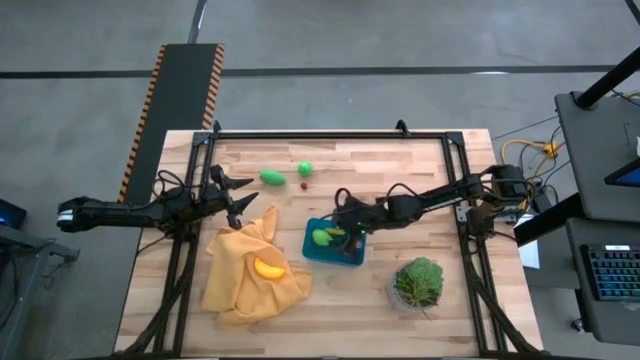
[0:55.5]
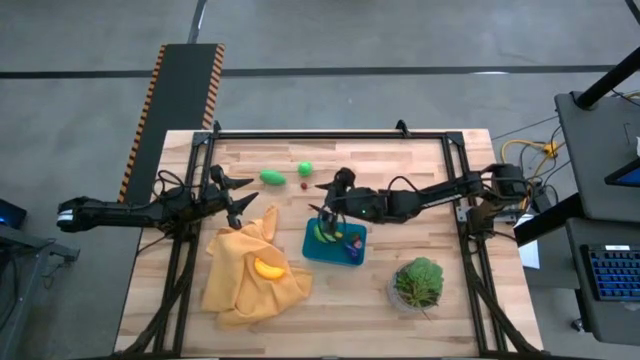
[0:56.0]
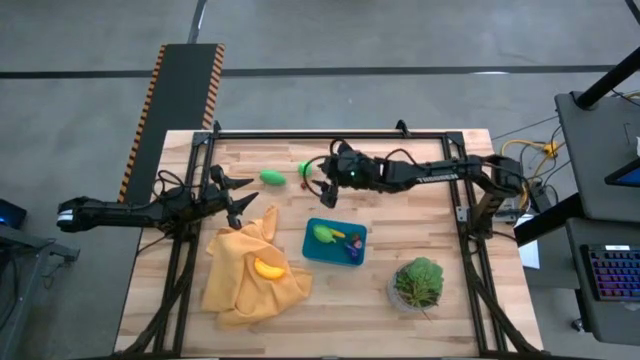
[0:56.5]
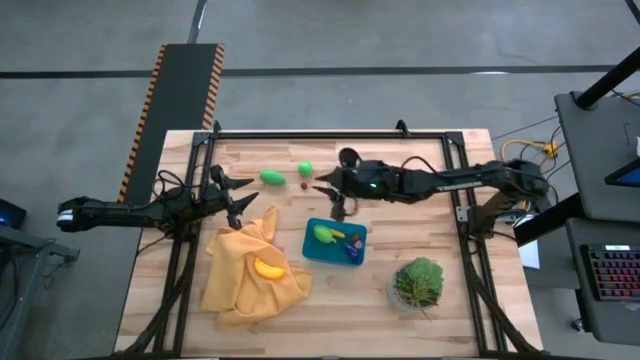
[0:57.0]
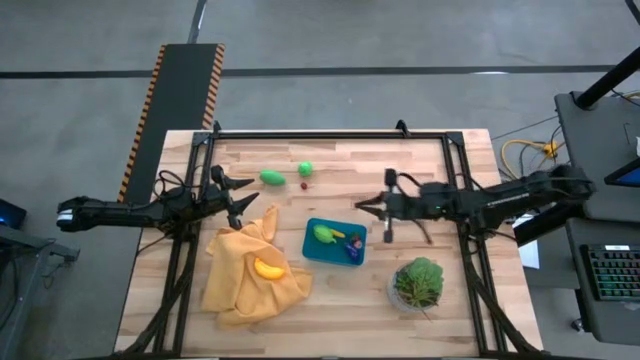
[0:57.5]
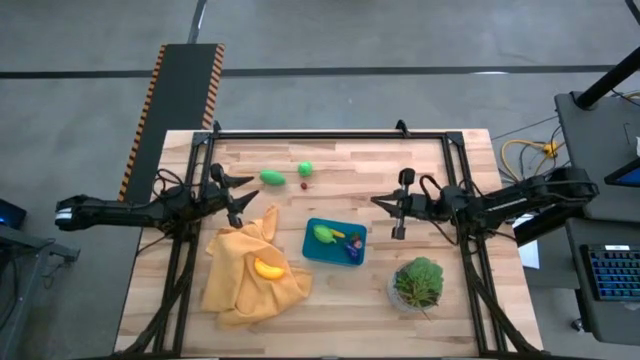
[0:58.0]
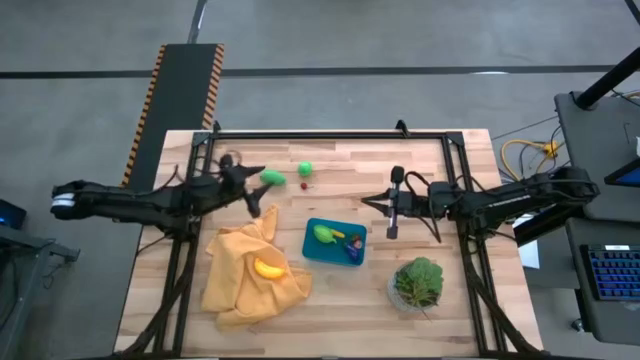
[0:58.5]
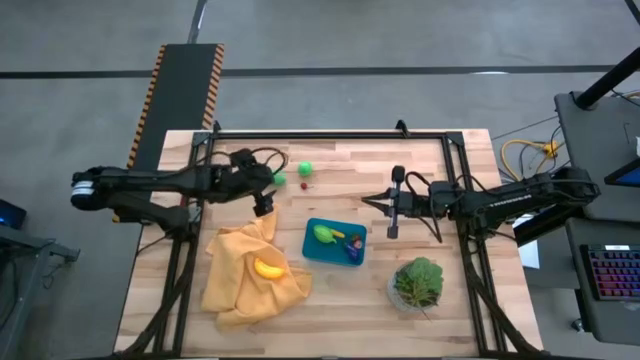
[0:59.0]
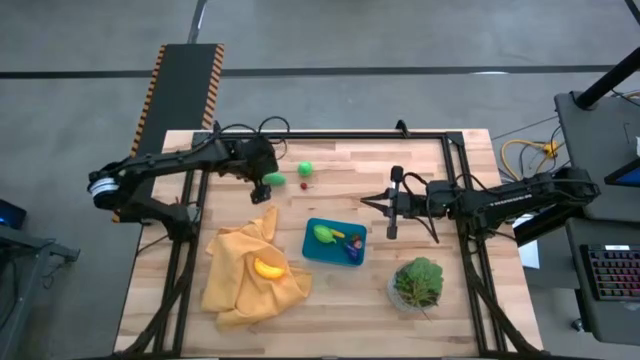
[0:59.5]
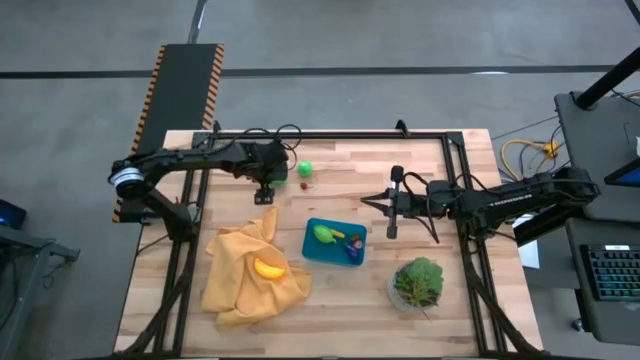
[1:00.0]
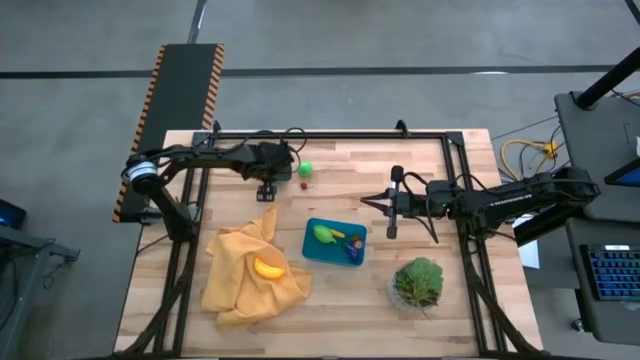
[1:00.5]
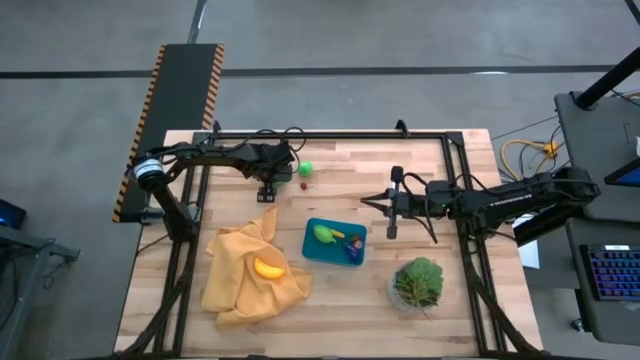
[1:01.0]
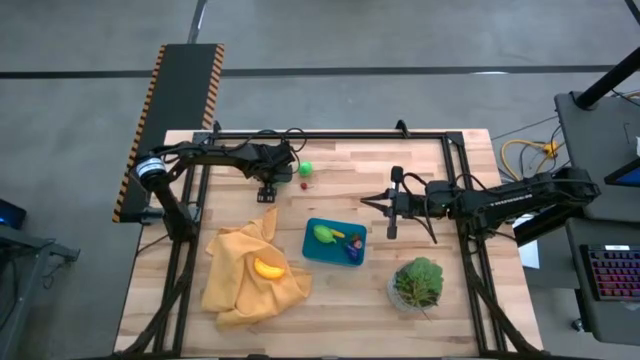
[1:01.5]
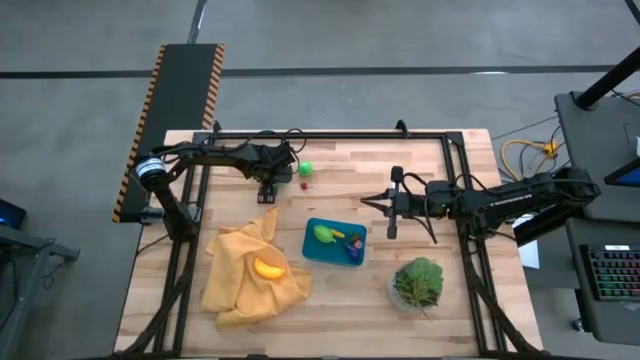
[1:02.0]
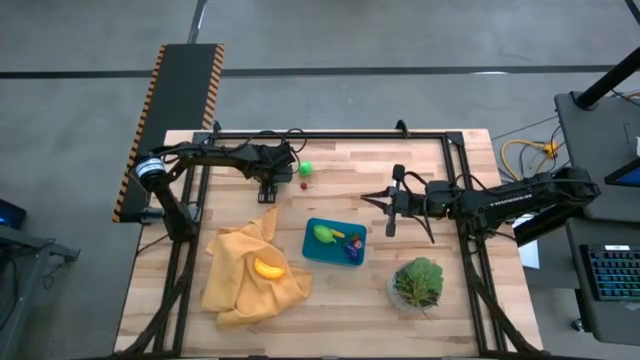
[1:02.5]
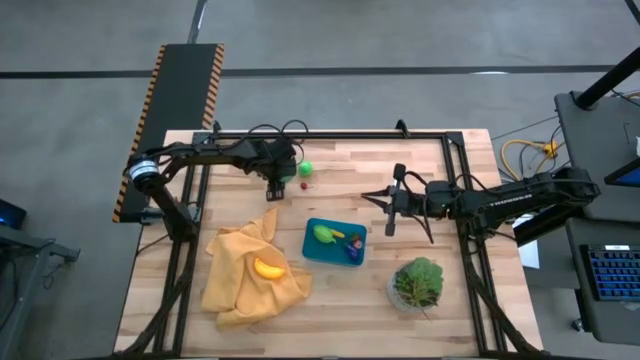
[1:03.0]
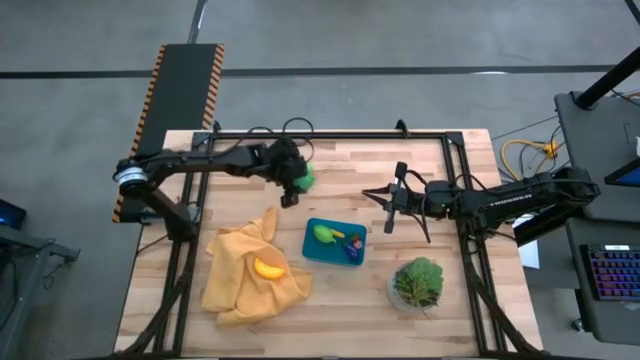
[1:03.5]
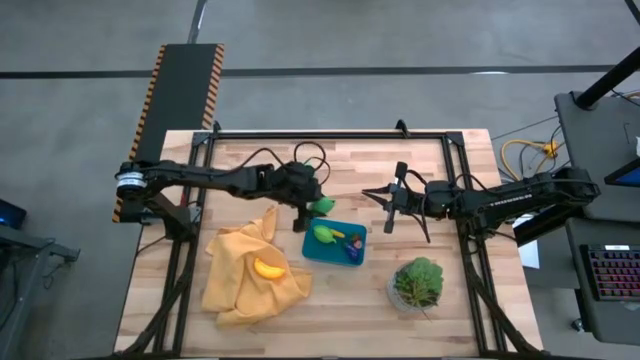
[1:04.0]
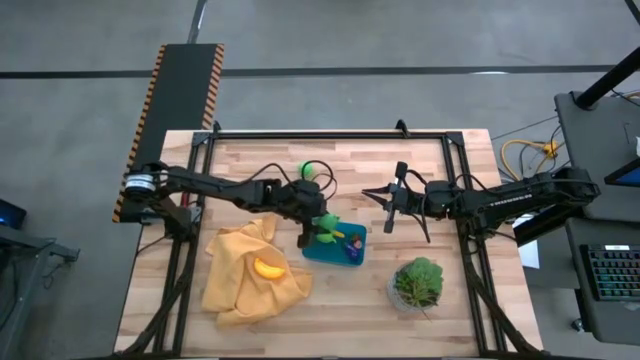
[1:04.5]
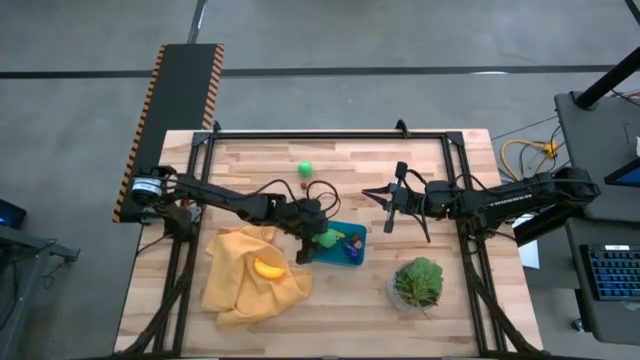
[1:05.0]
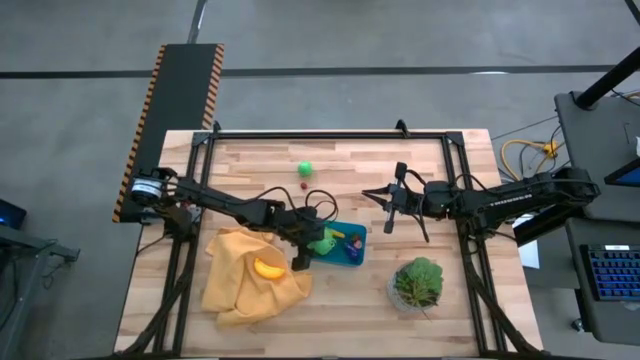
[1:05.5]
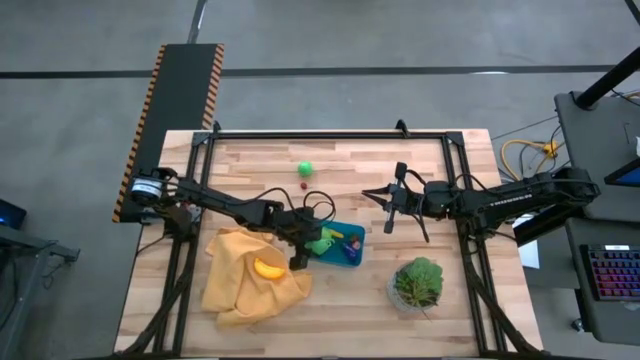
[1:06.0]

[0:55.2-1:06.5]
Task: Pick and placing Produce into tupperware
Put the green corn into the blue bin

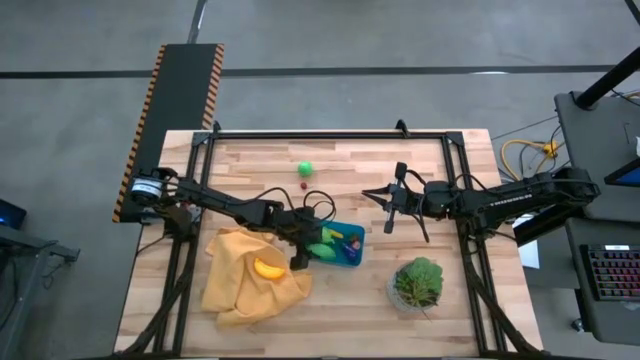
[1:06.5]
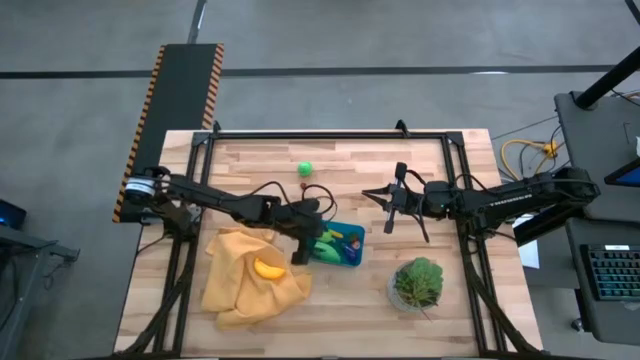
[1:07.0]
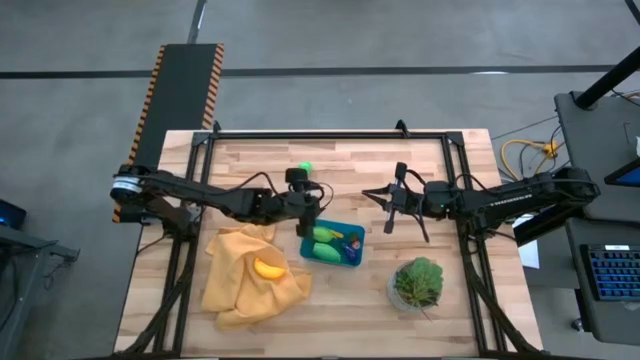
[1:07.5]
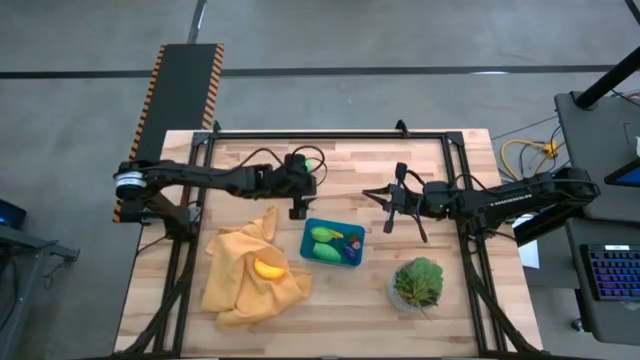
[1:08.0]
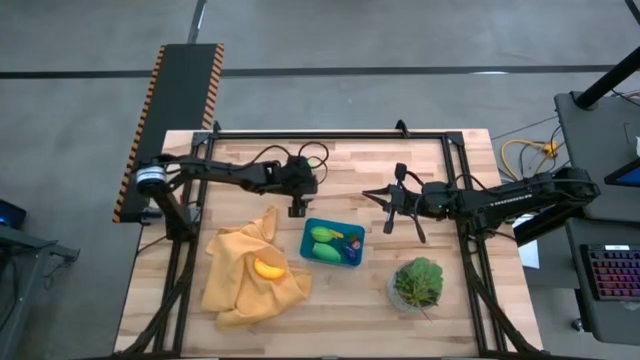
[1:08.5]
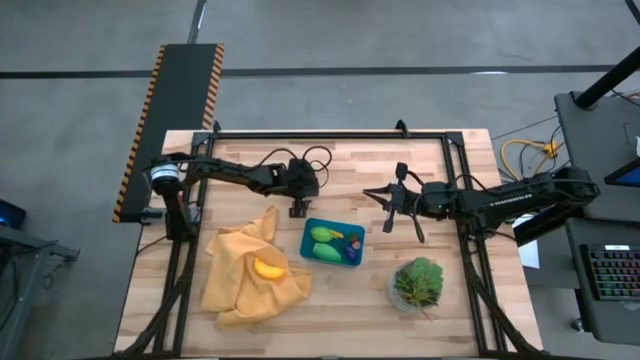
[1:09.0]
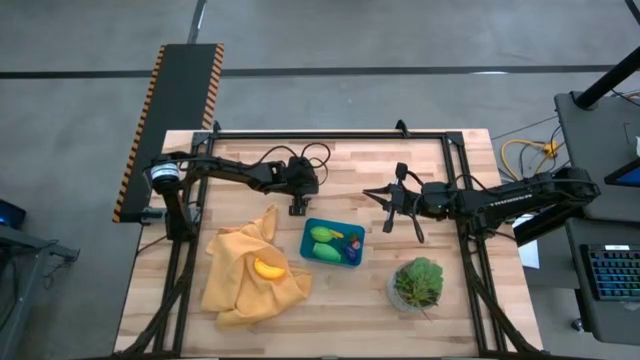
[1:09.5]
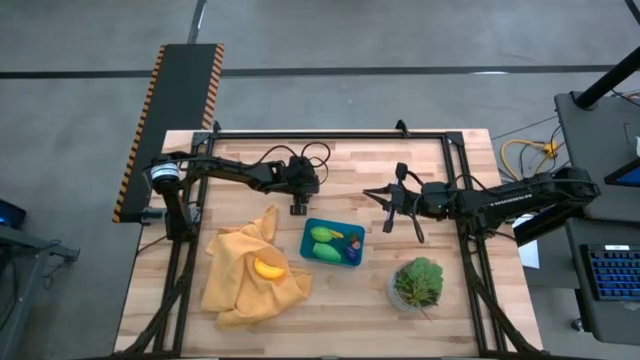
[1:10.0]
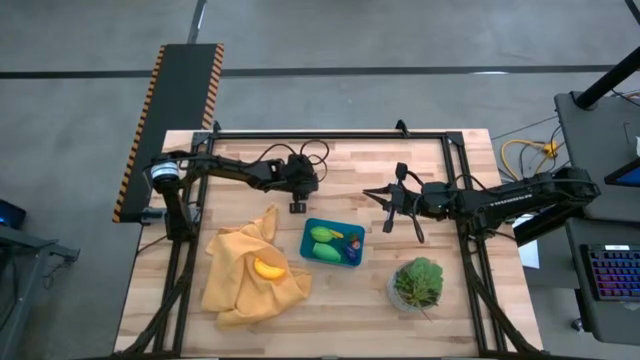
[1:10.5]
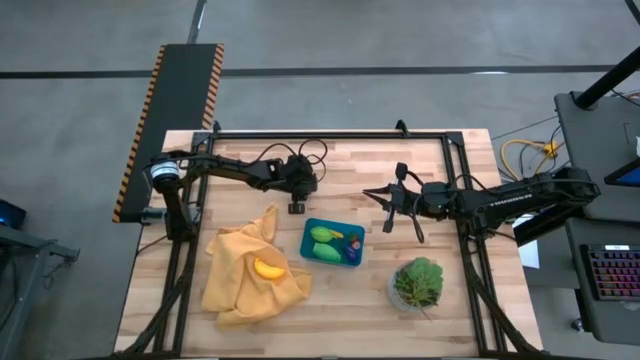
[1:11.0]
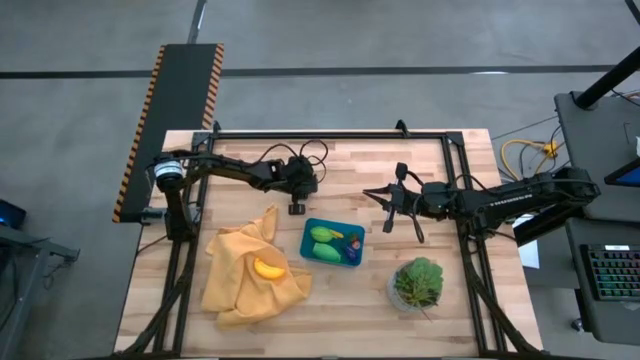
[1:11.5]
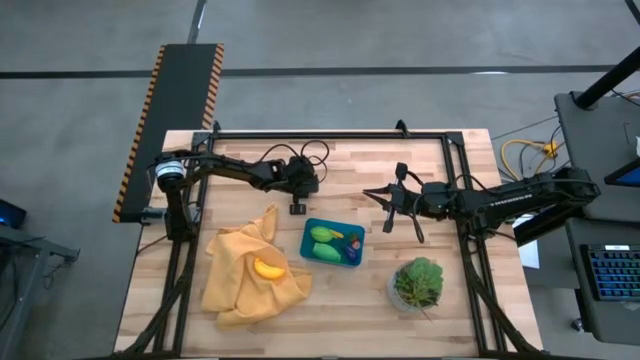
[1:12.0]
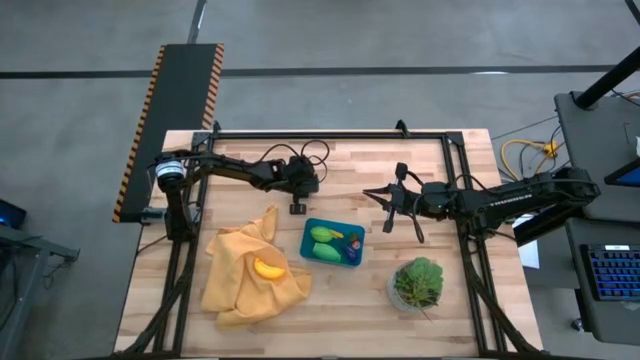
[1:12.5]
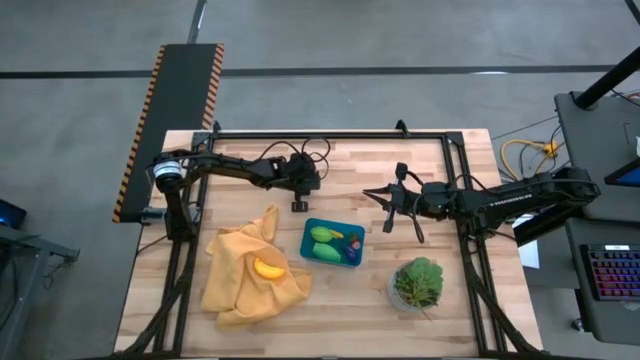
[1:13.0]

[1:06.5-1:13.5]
Put the red cherry into the blue bin

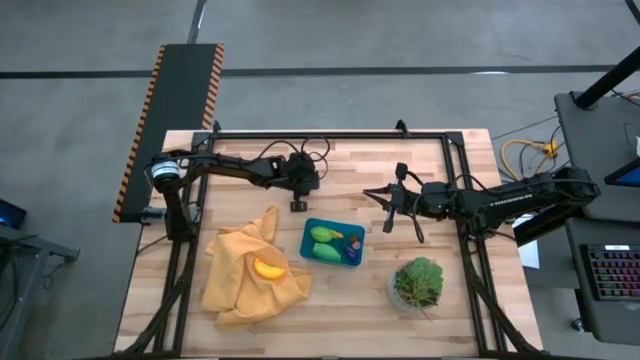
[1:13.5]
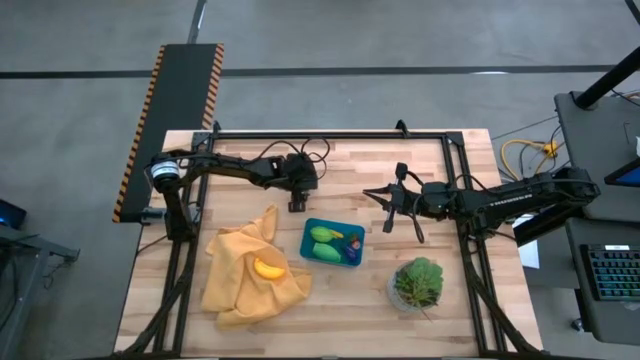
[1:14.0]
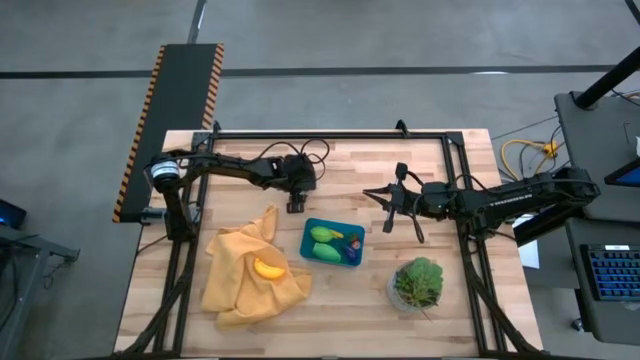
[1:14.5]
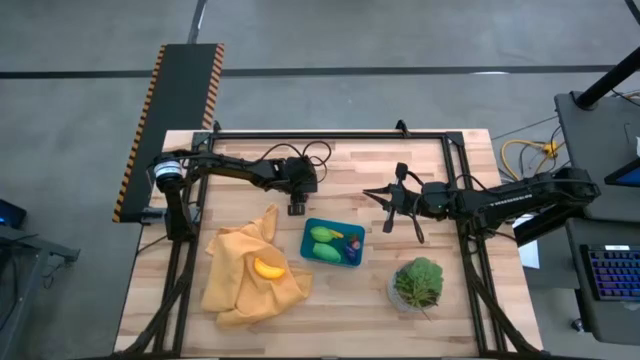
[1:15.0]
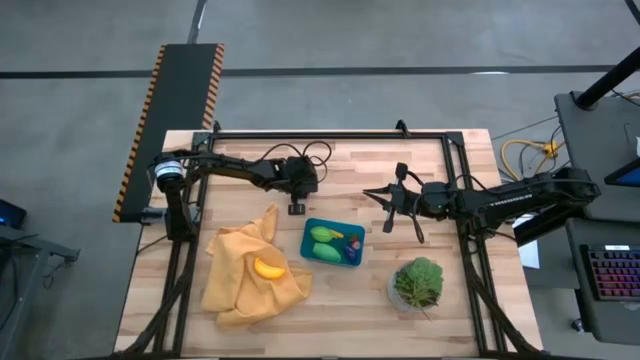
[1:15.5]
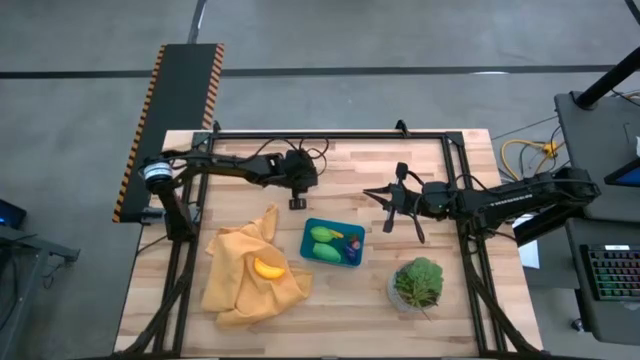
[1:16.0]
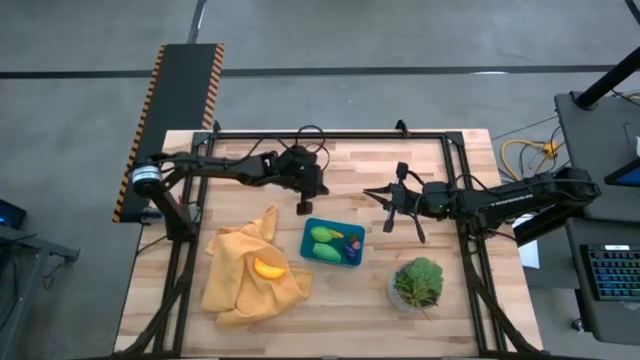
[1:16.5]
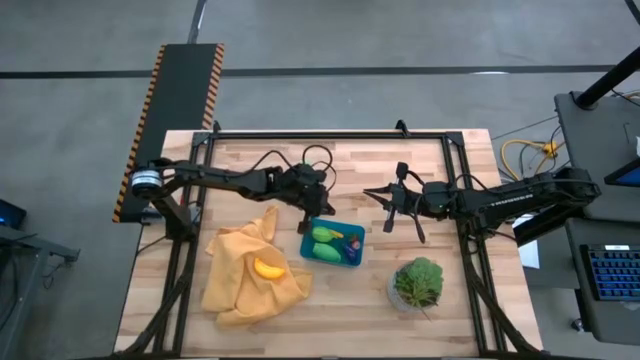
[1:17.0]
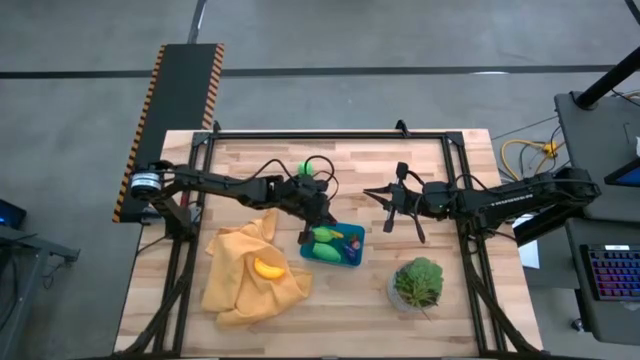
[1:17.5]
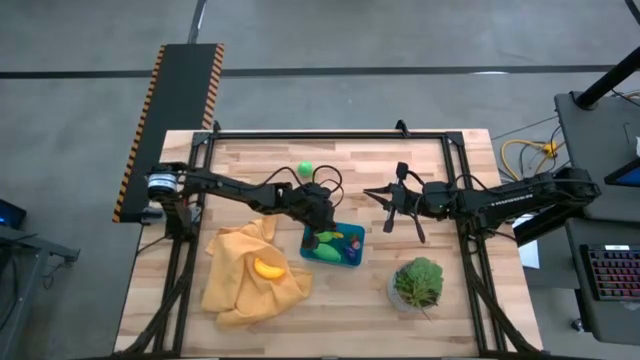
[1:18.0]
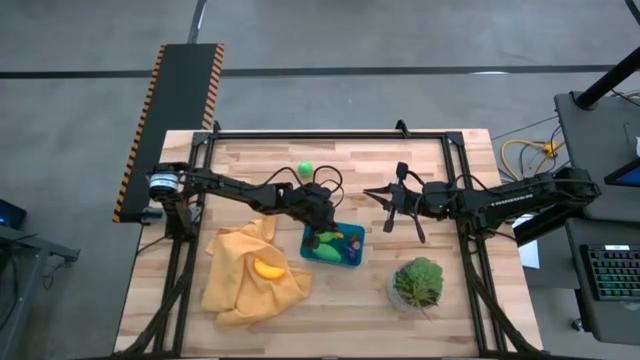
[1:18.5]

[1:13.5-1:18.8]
Put the red cherry into the blue bin
